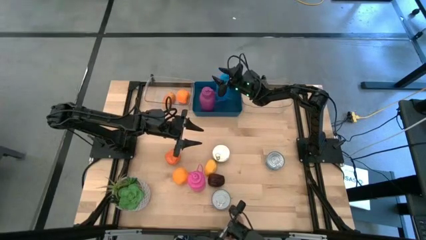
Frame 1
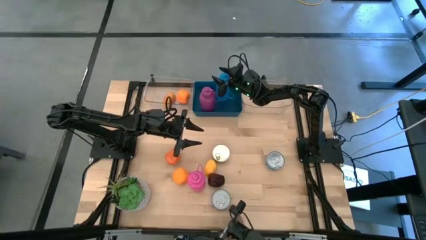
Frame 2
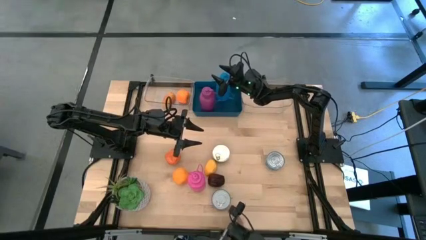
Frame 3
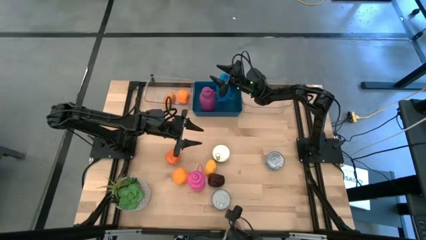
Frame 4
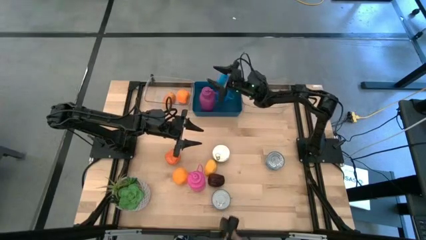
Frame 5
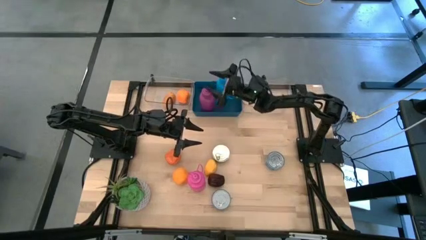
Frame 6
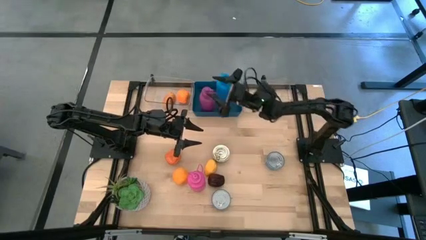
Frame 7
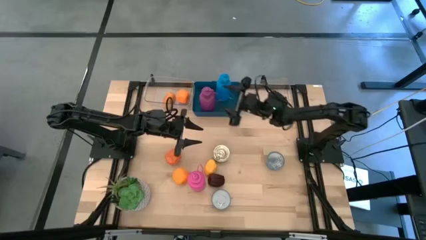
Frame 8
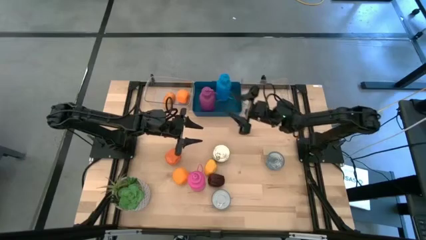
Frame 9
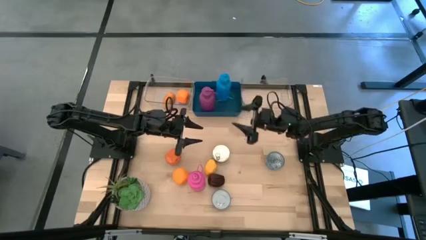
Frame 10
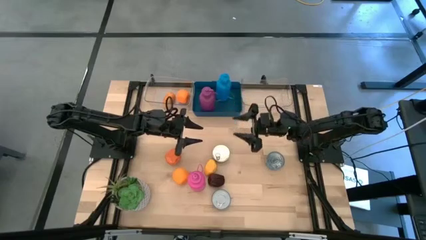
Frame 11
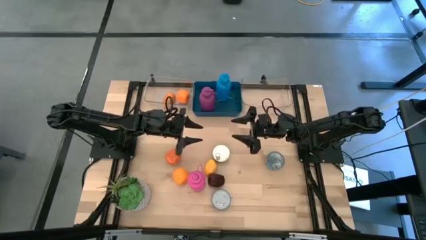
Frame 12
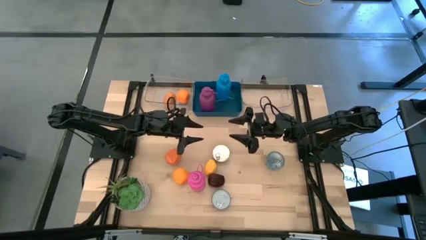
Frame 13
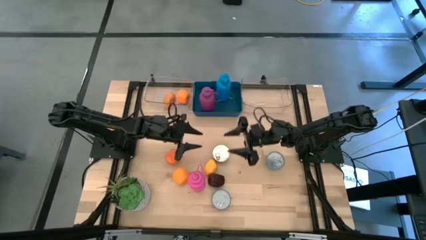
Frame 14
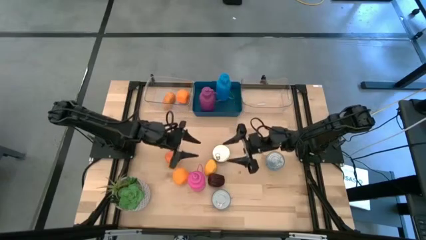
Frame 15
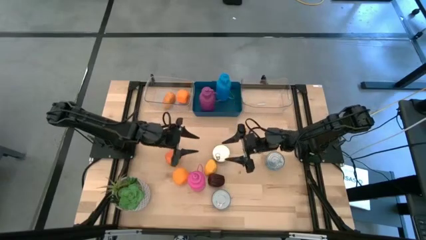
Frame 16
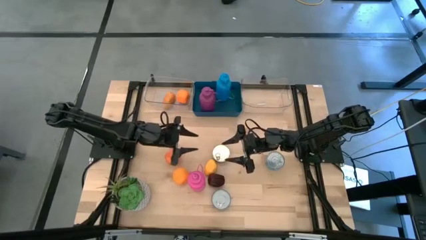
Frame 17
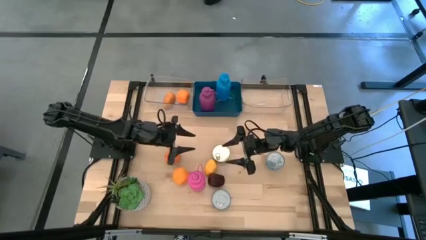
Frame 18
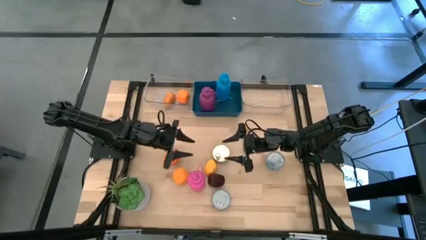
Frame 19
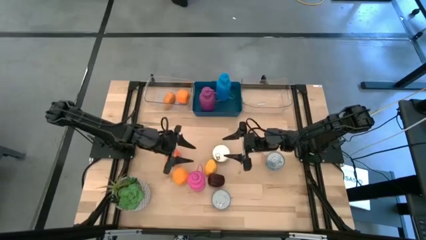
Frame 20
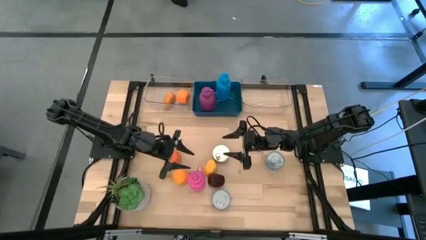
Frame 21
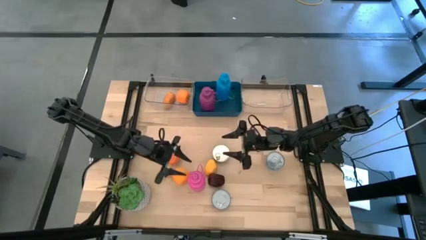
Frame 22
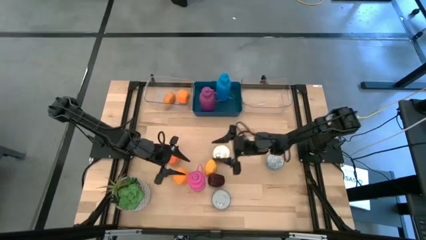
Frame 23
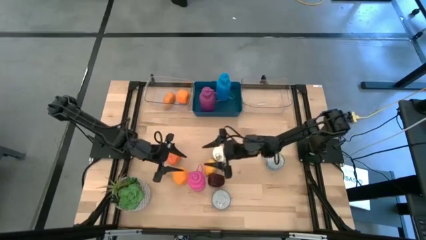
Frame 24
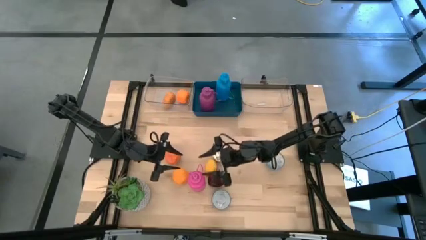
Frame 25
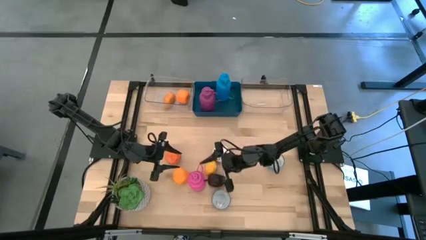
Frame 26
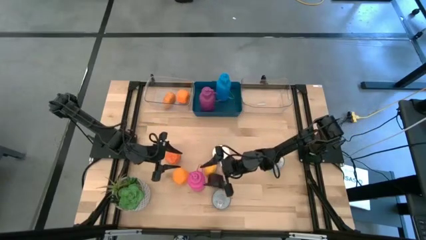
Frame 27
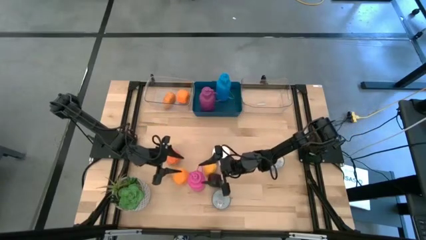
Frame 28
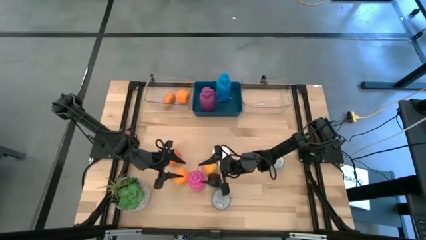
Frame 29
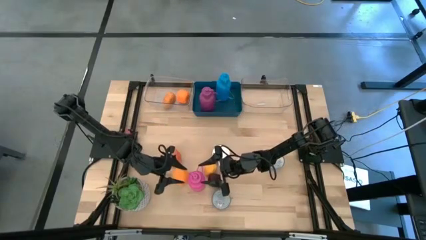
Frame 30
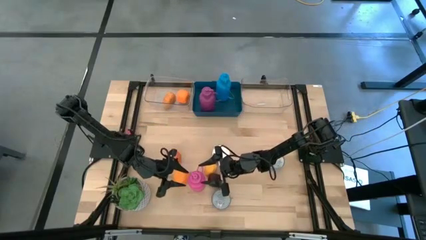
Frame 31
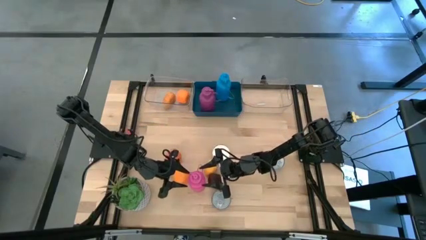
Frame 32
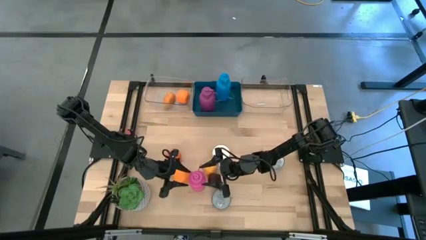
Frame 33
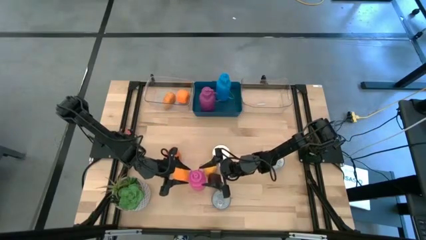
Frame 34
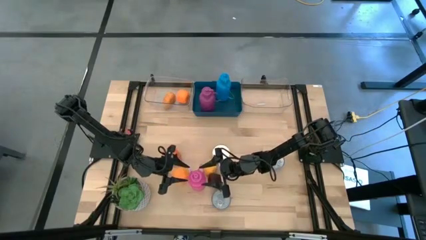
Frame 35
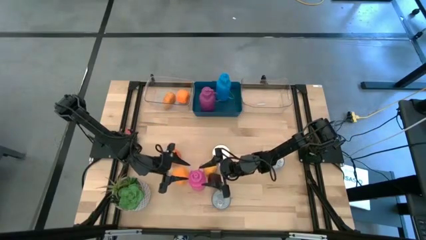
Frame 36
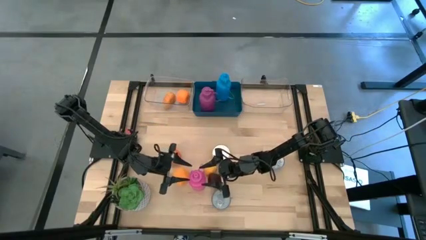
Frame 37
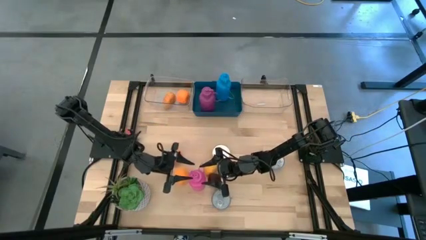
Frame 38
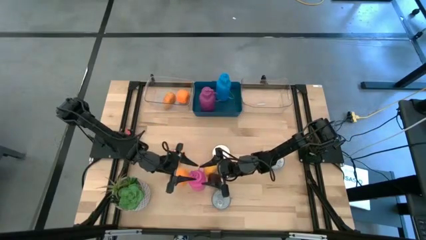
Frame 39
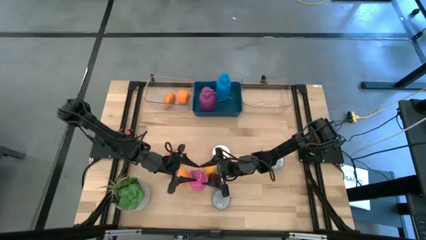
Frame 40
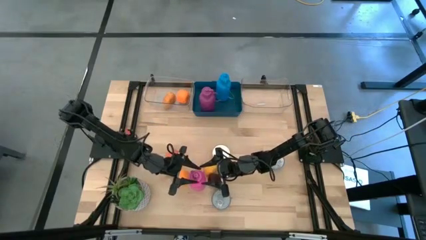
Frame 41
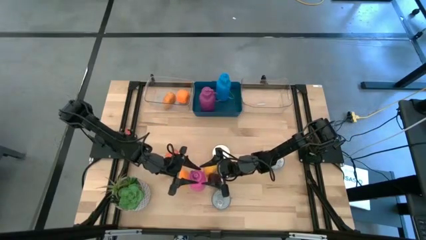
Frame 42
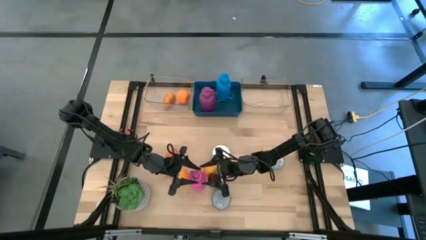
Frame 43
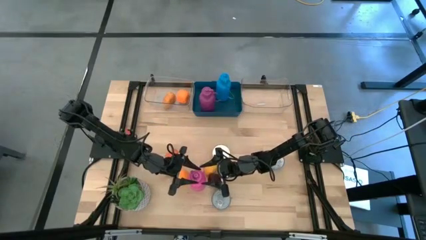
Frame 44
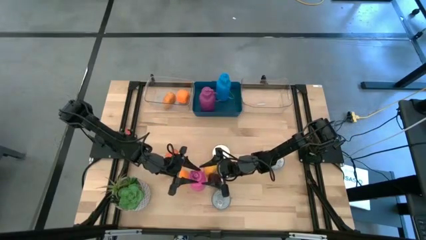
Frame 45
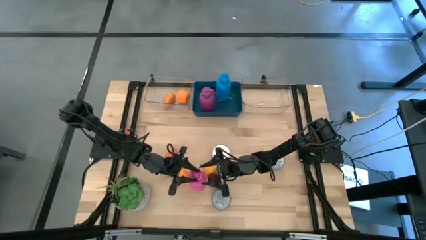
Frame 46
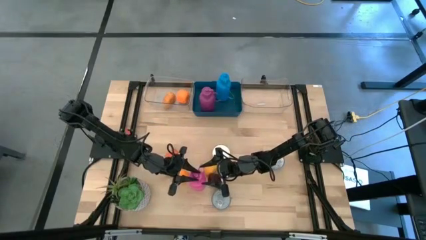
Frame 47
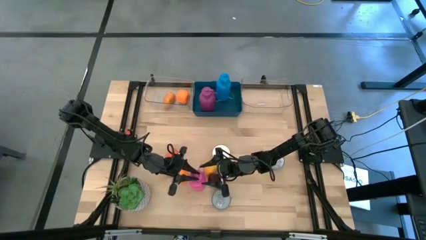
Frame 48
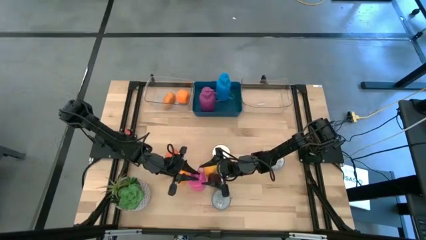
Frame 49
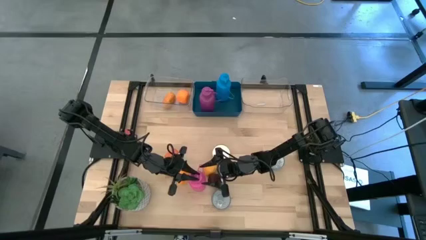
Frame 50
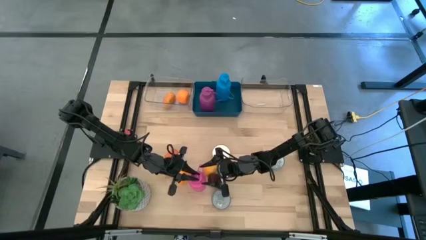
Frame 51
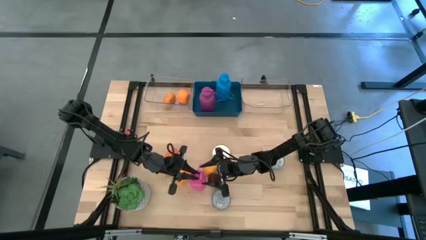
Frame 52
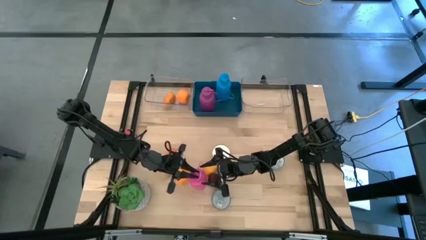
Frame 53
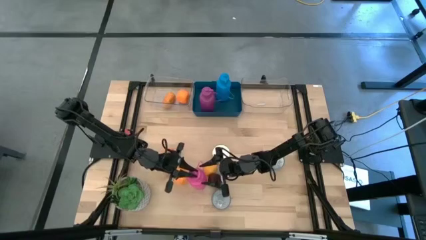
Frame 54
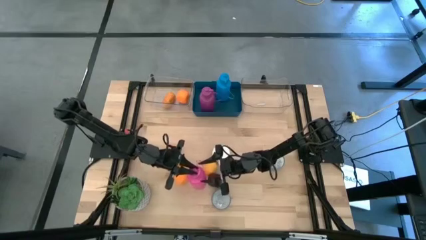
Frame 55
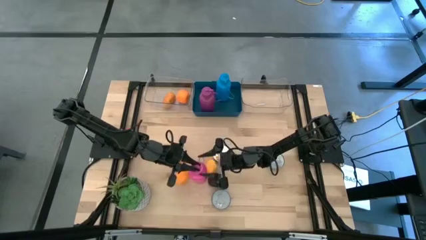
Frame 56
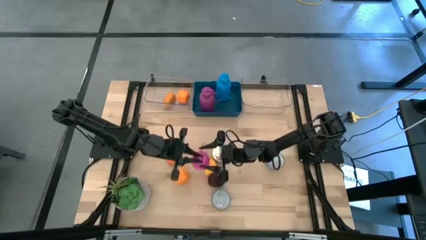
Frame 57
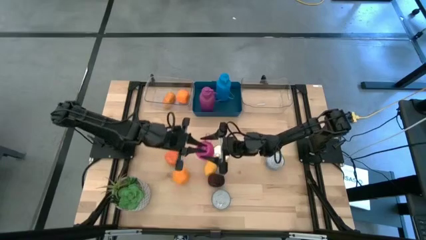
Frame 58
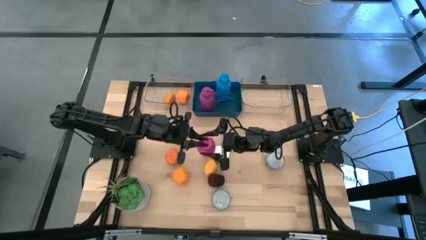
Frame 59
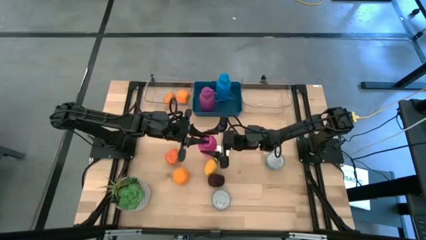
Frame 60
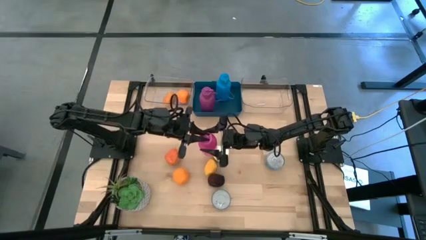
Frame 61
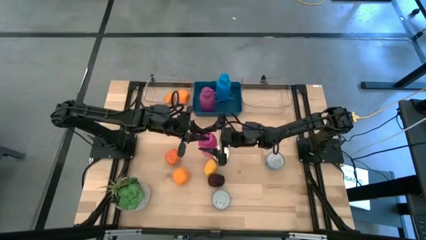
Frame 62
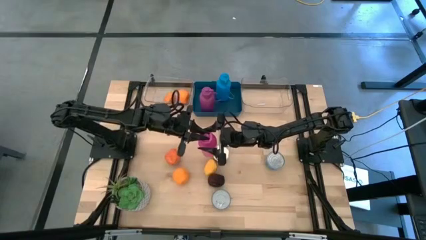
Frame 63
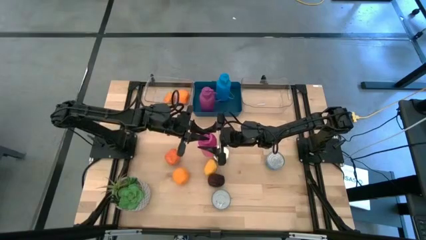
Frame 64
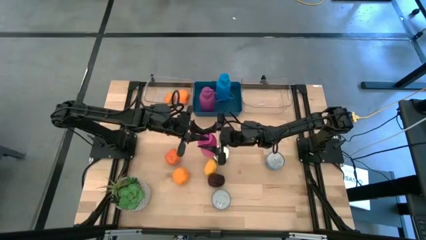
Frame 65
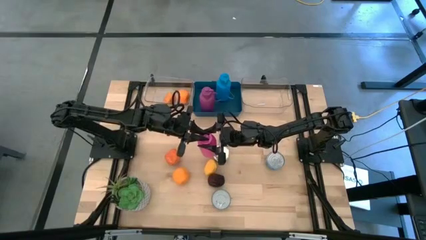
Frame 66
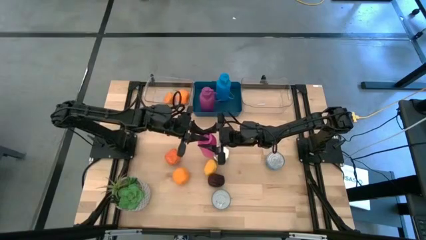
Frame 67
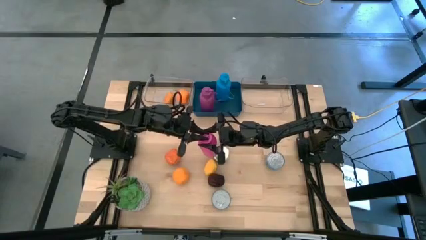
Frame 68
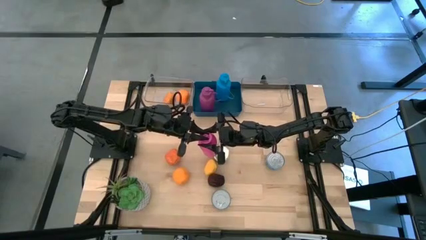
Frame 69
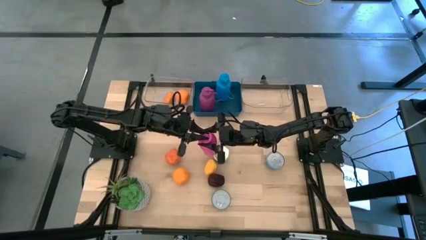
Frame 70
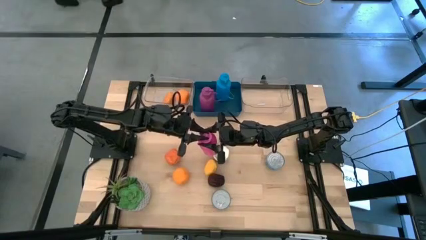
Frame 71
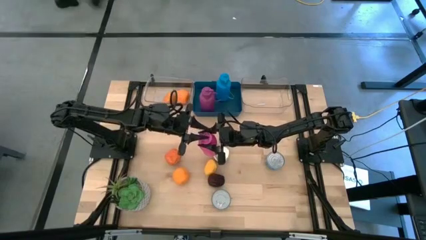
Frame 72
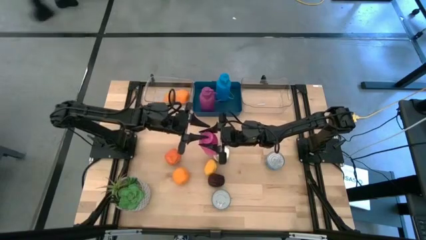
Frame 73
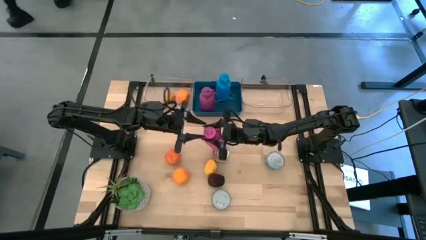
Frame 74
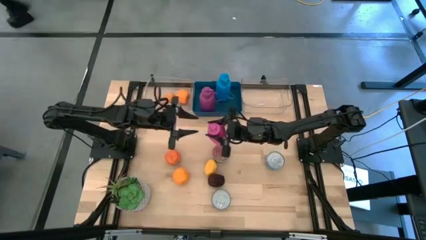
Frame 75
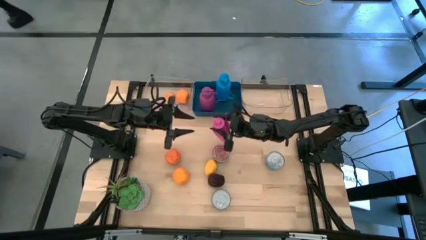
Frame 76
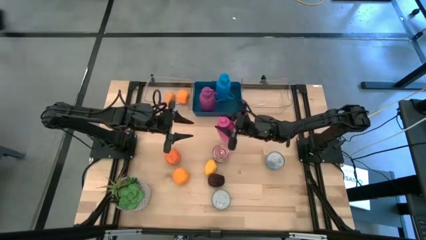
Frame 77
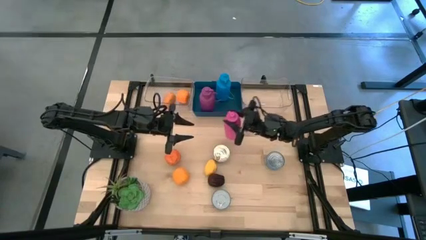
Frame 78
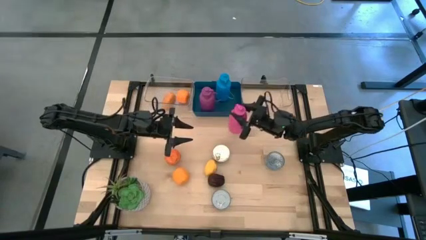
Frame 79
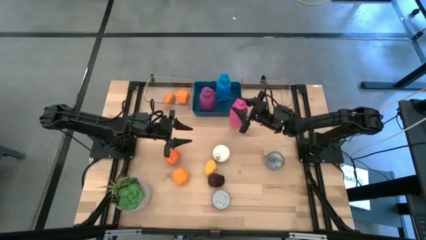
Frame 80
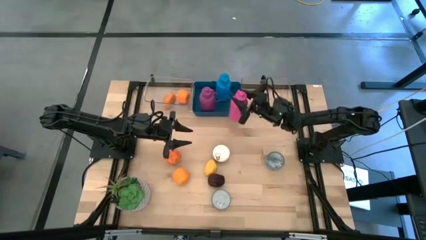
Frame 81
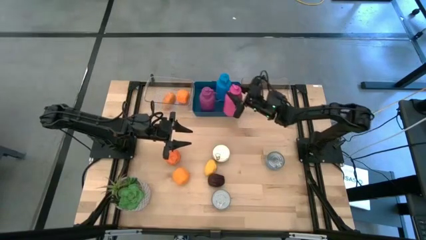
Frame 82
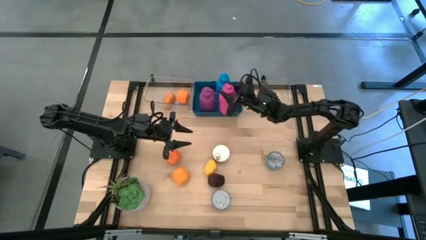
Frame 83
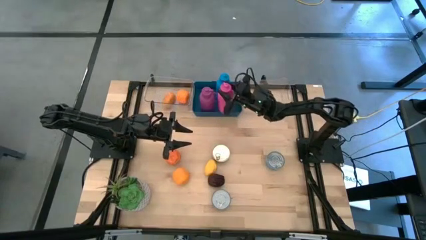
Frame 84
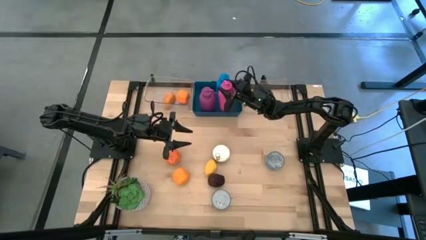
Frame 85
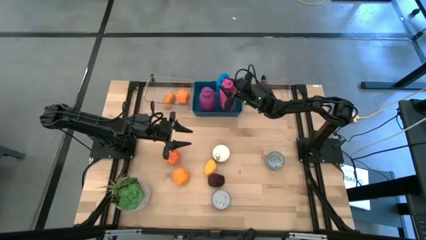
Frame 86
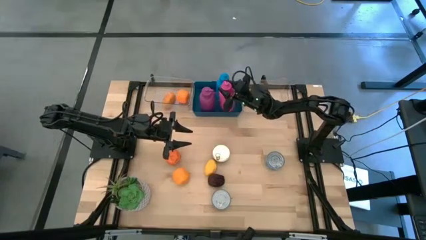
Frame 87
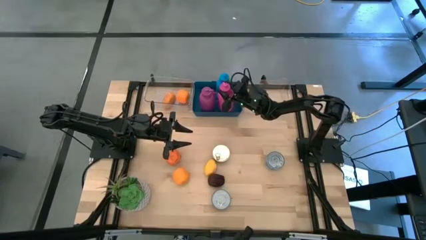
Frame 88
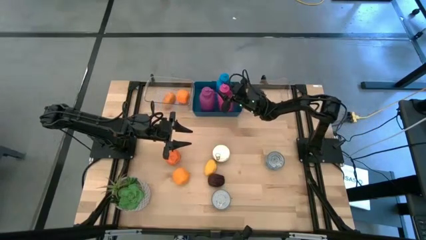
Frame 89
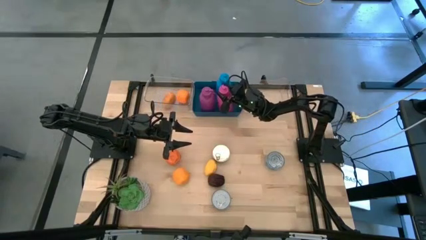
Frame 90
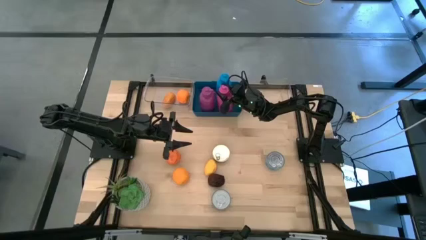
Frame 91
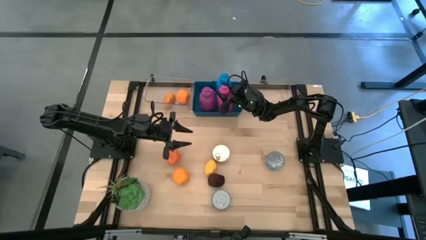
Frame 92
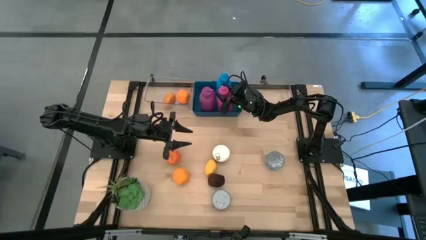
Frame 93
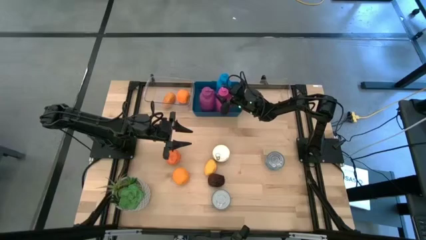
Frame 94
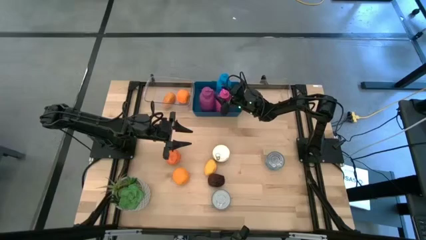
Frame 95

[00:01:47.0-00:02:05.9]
Task: Pick & Place Food Item
Put the pink water bottle into the blue bin
